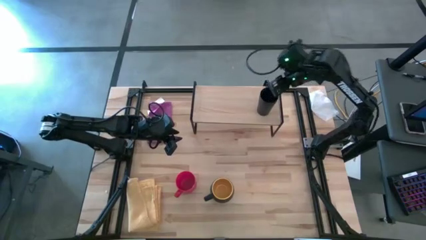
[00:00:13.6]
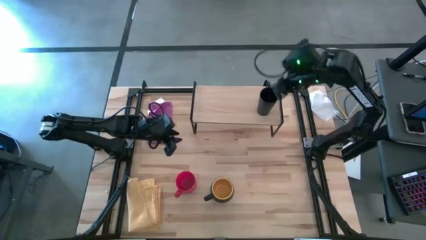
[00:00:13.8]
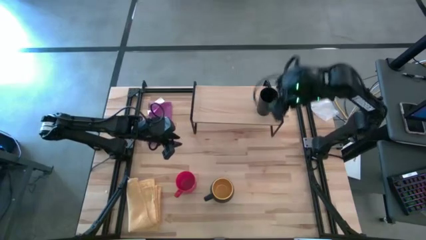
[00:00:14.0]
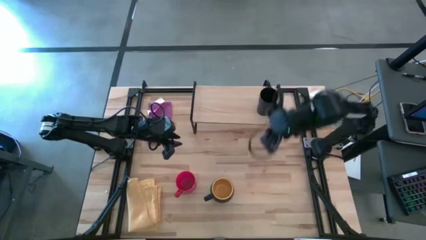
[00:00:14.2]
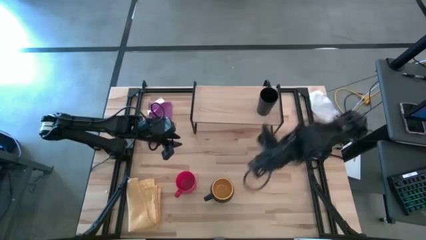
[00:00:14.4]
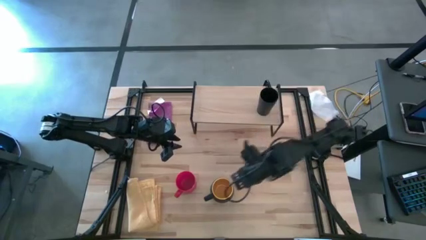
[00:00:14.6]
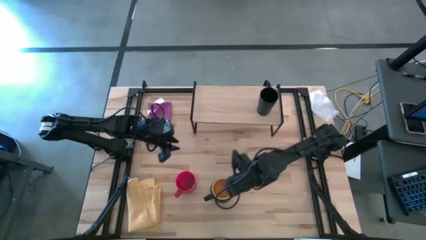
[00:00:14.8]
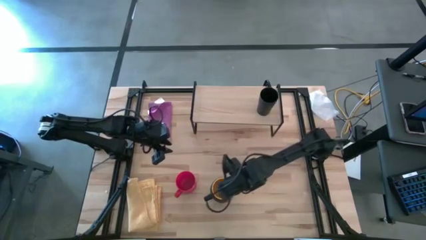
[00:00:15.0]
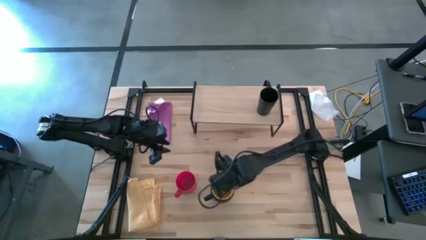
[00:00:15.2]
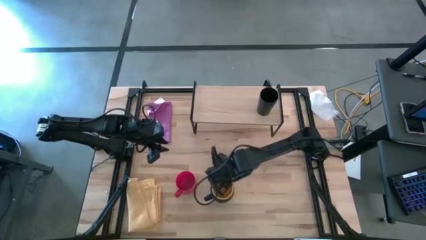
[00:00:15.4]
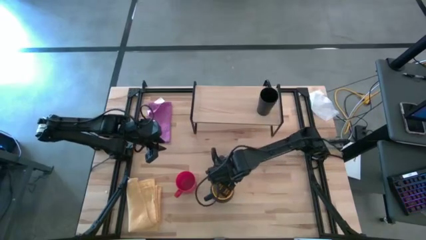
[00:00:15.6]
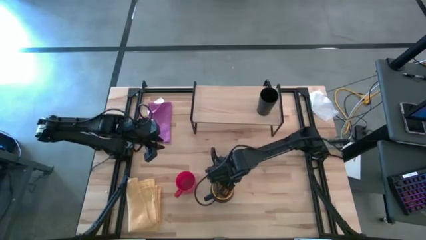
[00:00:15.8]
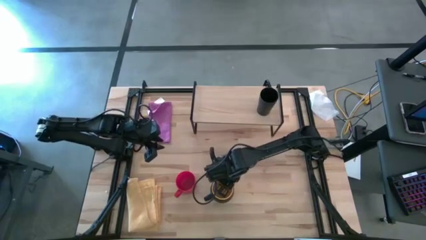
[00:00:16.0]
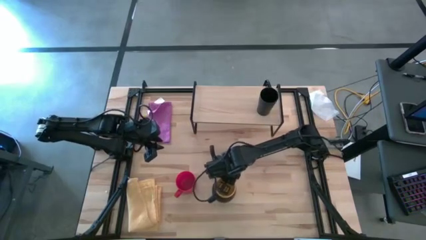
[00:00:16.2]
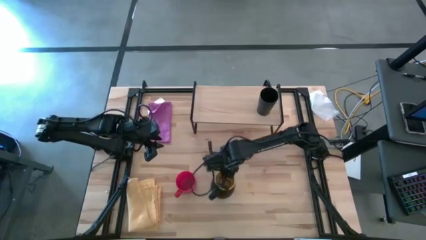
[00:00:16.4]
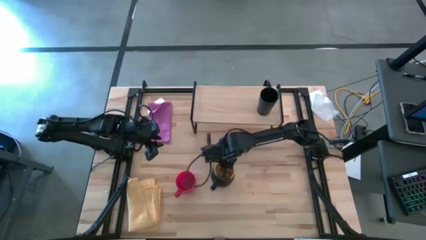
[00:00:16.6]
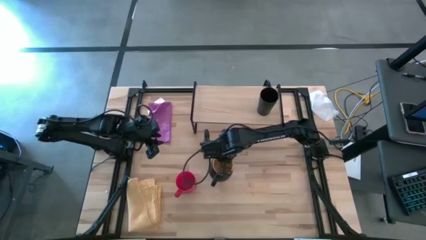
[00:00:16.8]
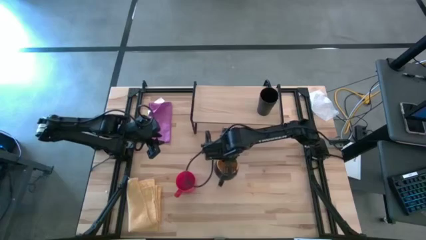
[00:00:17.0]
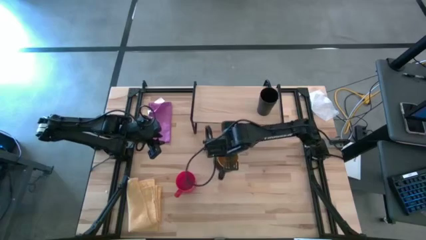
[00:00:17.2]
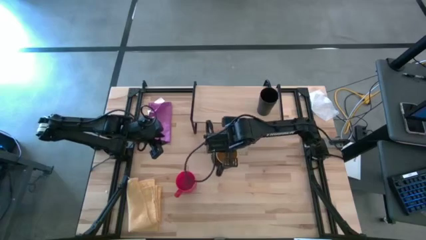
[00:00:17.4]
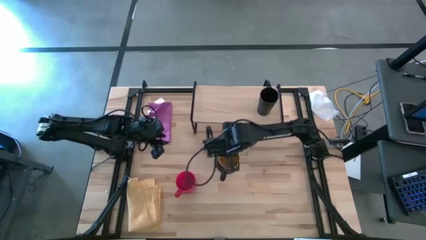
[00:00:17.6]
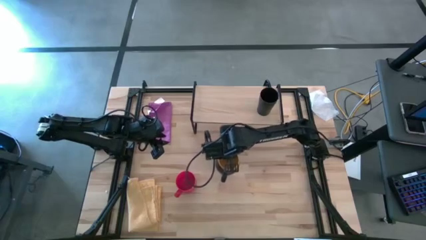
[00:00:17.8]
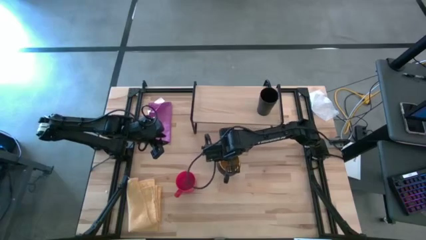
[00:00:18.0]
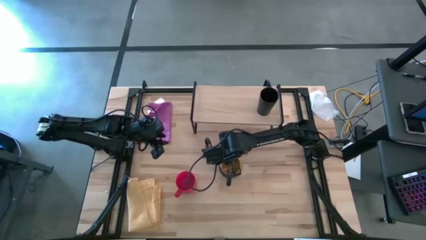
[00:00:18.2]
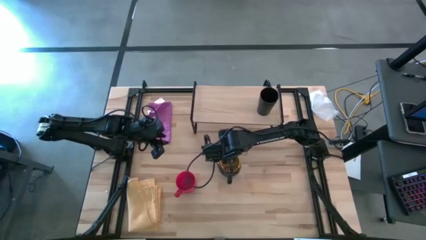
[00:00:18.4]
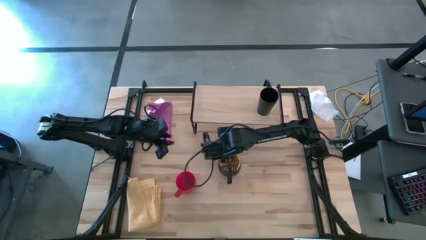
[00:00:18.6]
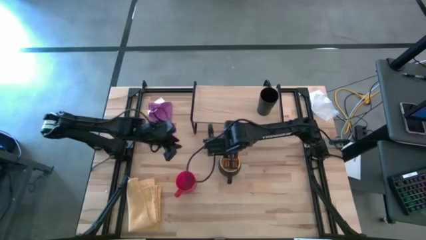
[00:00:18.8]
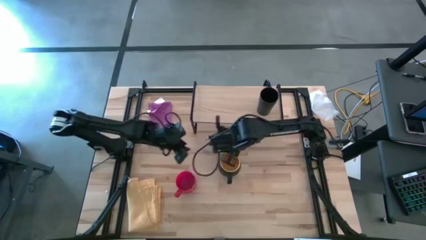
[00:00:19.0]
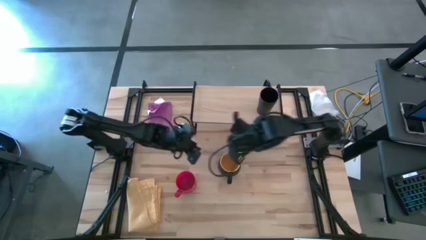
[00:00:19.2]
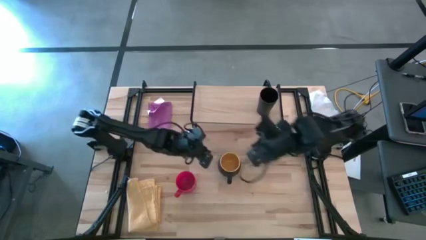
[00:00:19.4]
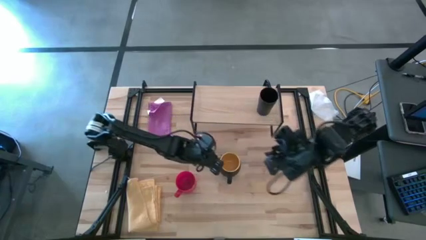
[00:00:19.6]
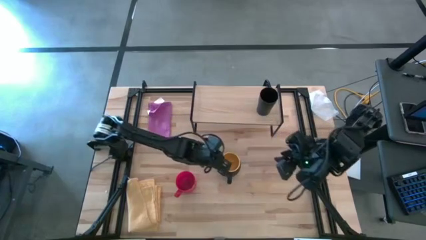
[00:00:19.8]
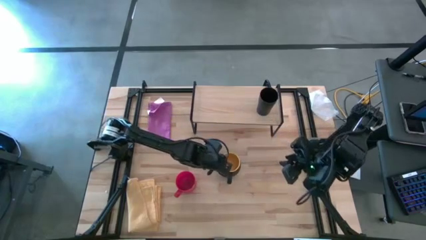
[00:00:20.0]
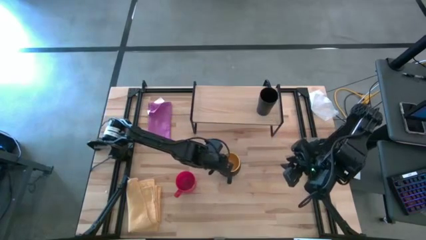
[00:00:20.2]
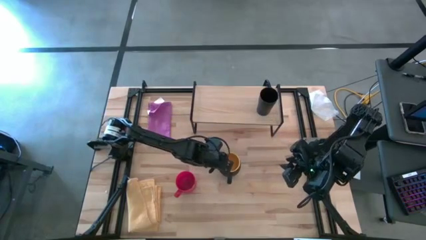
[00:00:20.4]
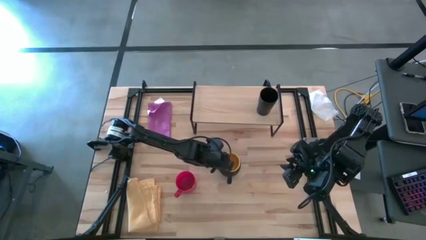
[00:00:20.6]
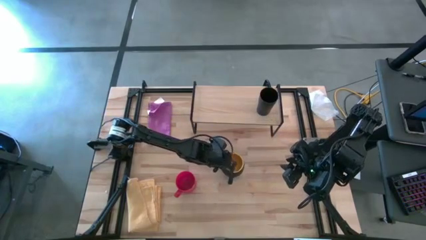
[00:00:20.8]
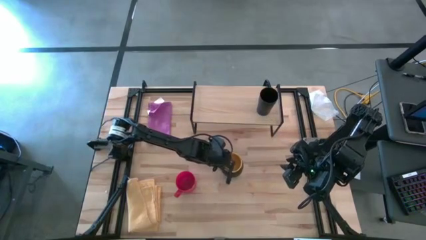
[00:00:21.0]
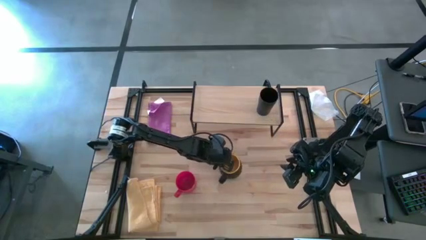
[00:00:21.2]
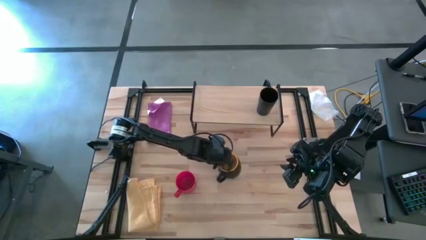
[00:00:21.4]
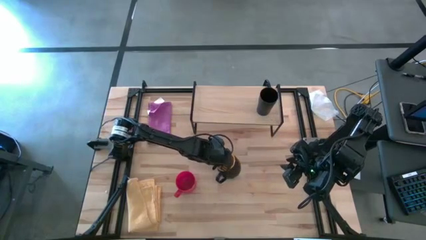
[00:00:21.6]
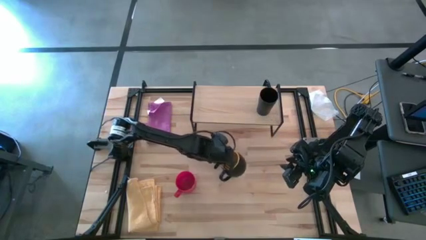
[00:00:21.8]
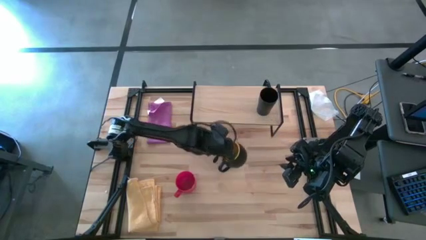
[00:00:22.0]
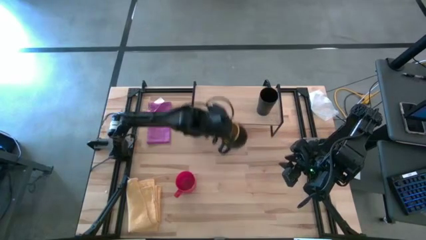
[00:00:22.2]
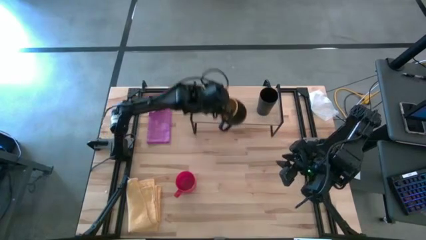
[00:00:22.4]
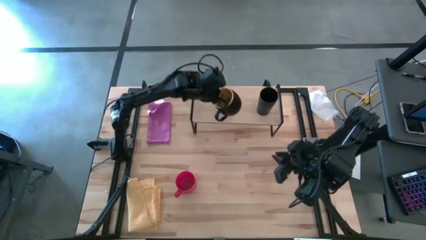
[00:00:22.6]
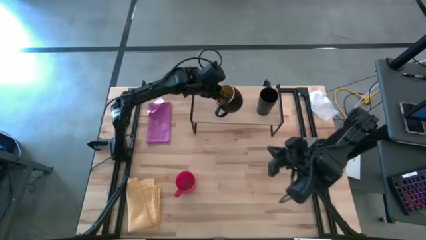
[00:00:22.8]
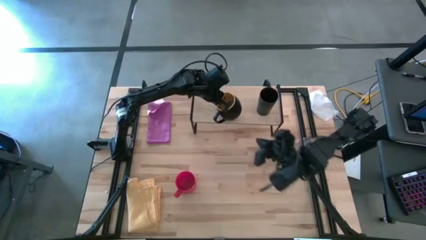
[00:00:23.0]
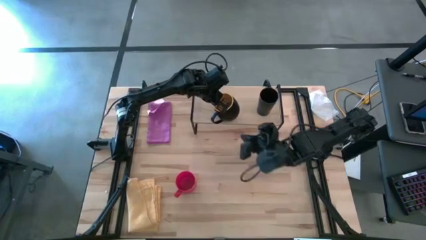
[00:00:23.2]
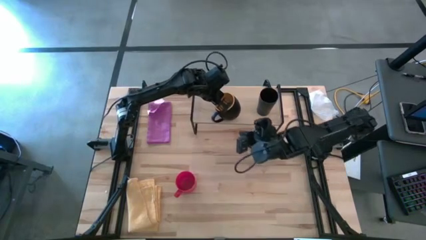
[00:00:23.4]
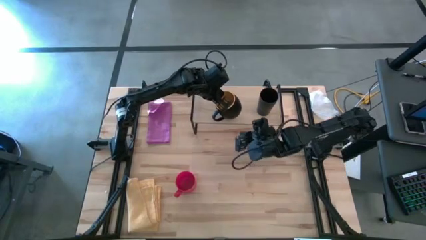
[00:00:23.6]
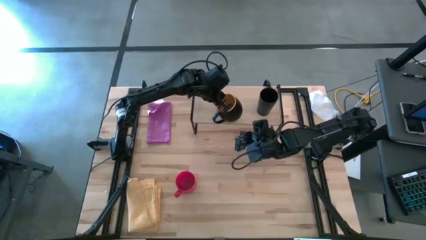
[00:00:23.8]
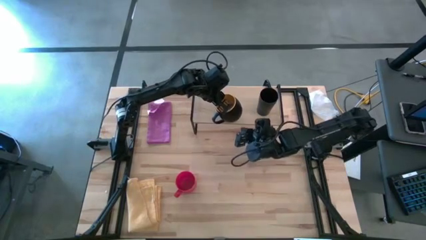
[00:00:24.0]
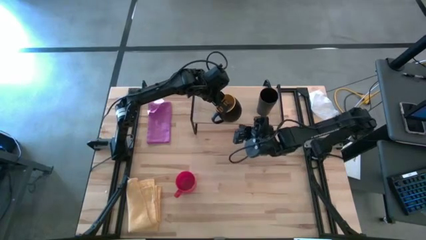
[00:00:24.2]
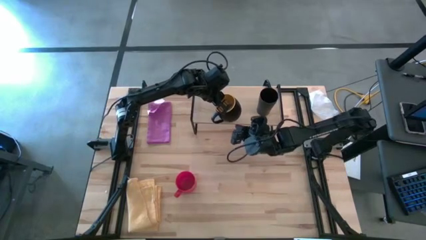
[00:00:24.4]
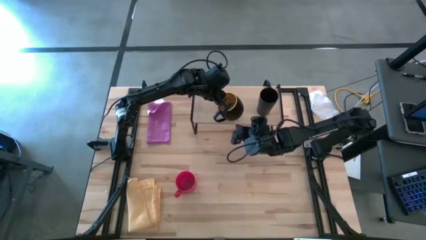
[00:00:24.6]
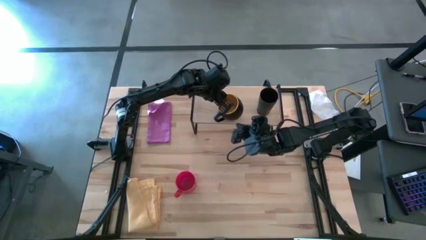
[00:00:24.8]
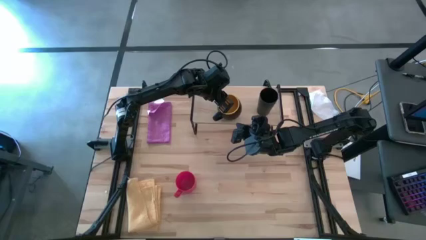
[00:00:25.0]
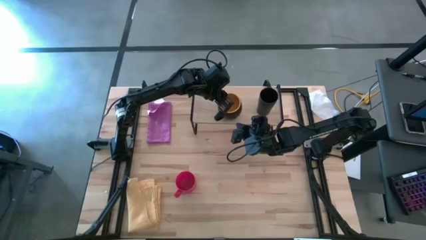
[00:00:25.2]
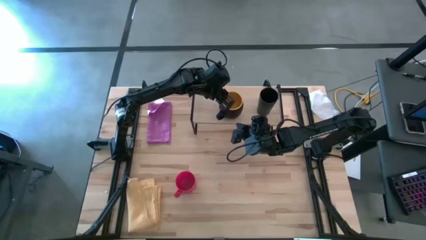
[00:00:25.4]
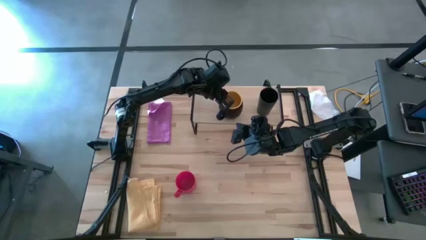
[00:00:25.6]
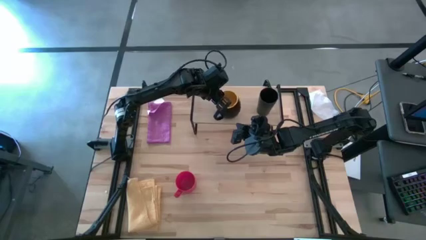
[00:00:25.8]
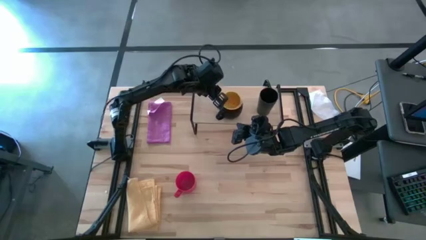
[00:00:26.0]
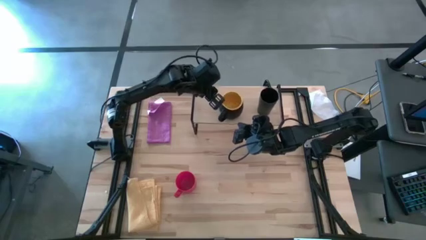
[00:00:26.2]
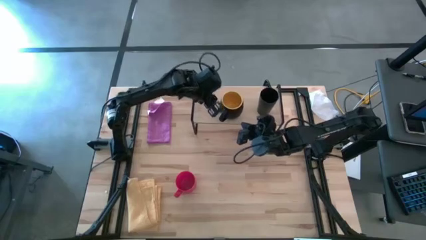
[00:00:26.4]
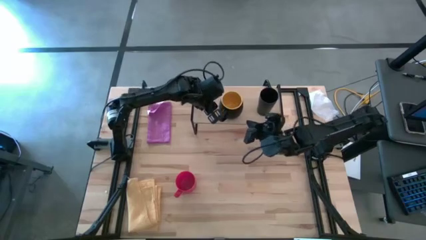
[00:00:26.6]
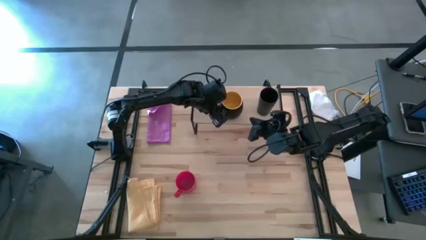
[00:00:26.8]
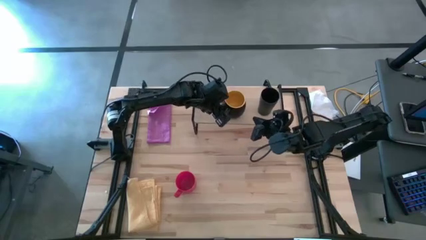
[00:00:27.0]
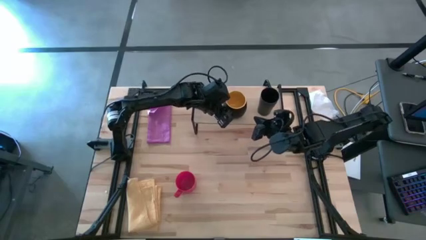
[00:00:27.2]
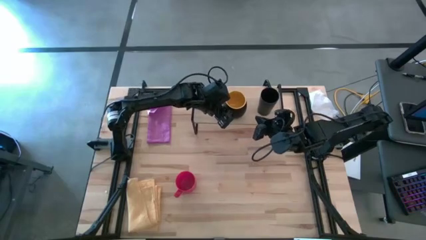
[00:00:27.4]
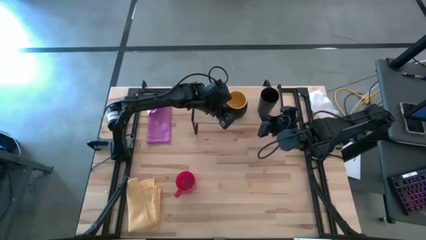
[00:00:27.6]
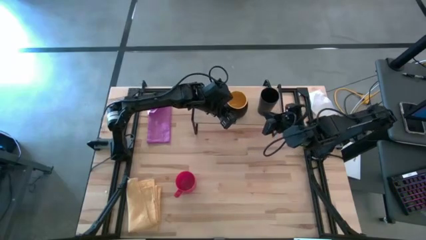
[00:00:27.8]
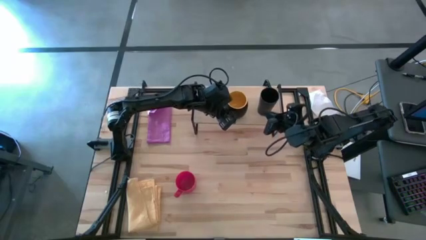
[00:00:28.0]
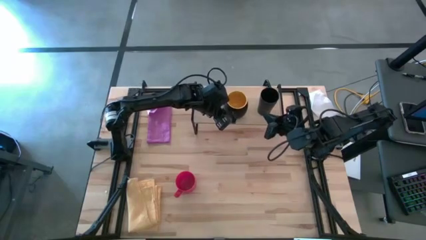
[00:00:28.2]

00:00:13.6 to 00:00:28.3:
Task: Stack small to large cups/mugs on shelf
Put the black mug on the shelf
